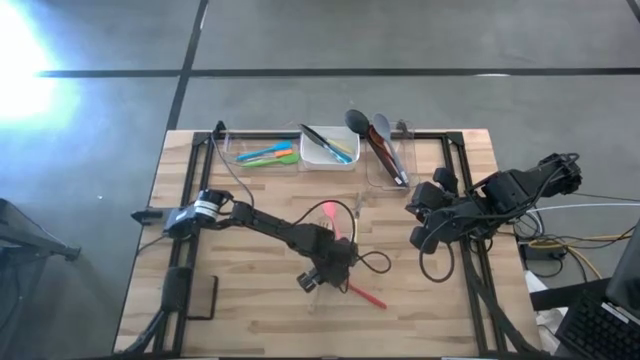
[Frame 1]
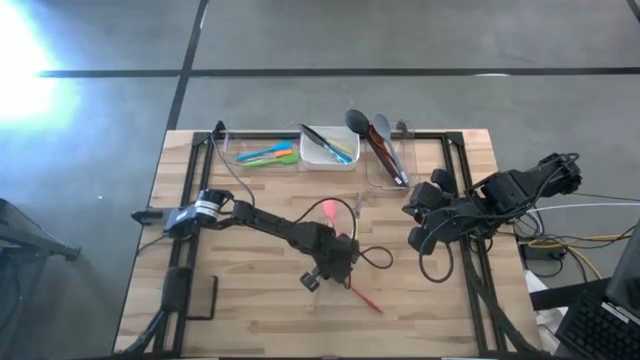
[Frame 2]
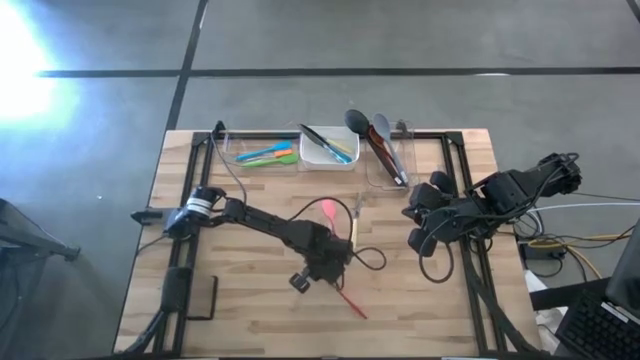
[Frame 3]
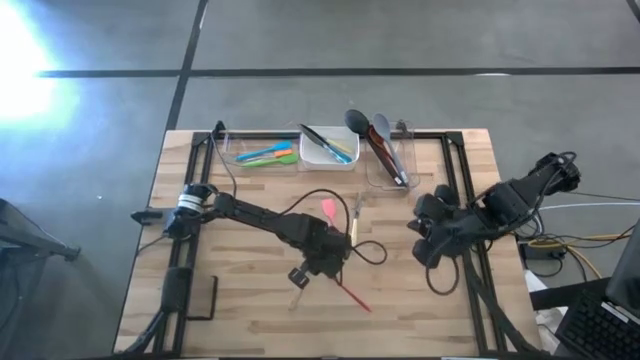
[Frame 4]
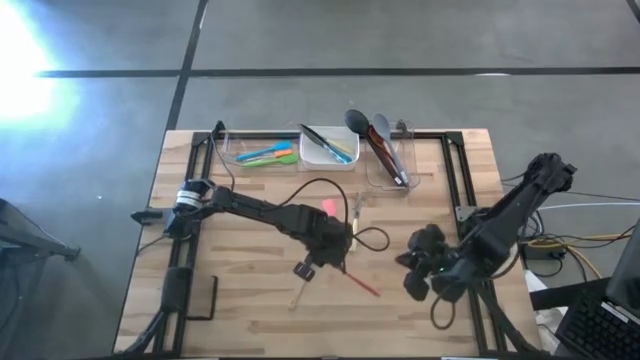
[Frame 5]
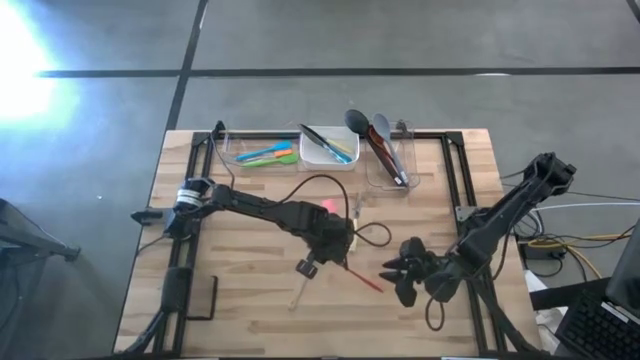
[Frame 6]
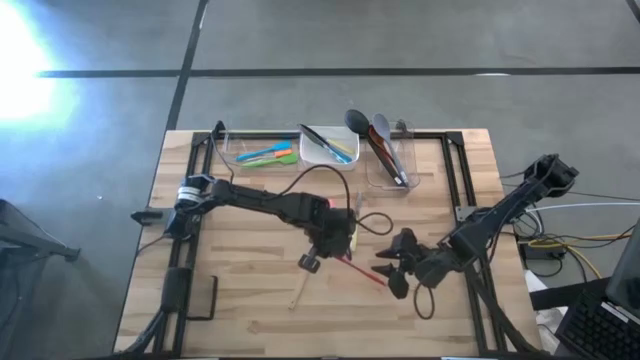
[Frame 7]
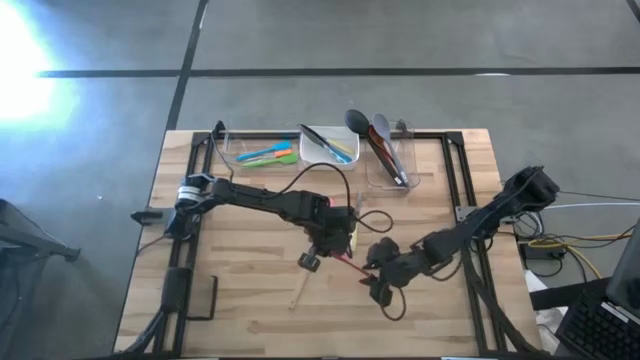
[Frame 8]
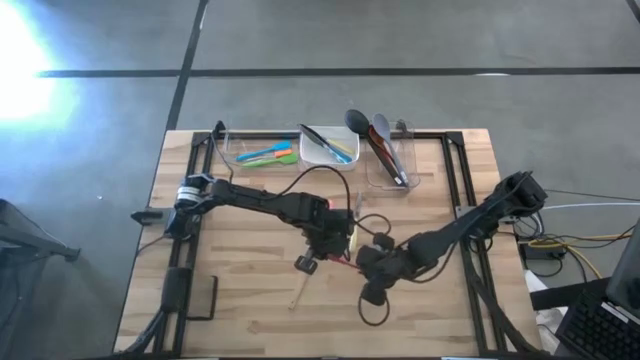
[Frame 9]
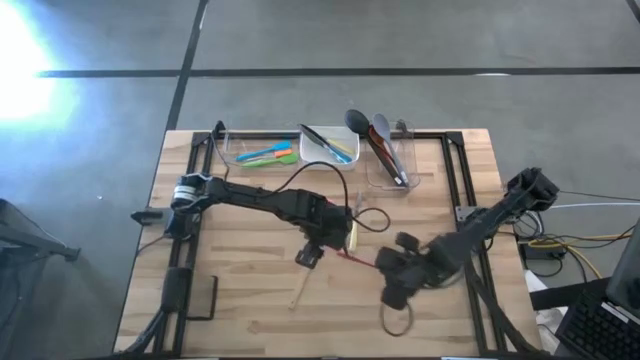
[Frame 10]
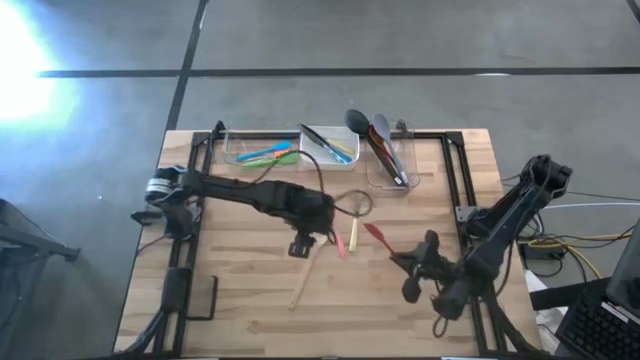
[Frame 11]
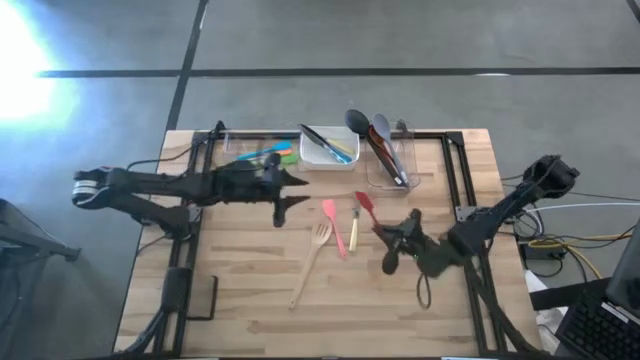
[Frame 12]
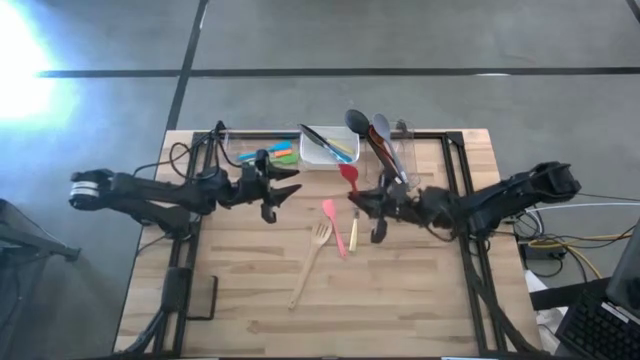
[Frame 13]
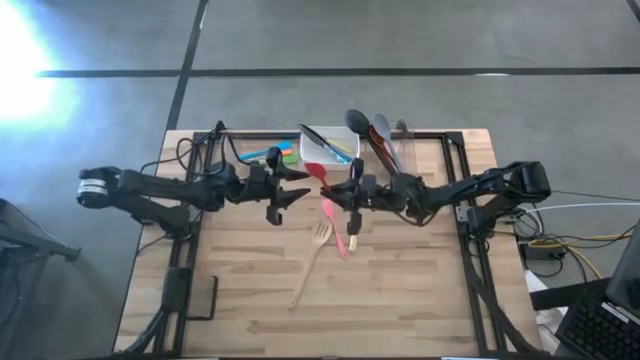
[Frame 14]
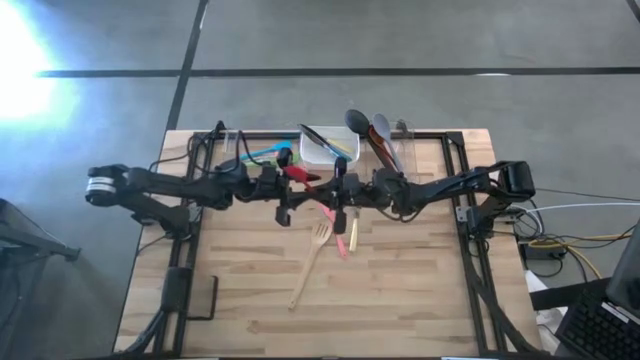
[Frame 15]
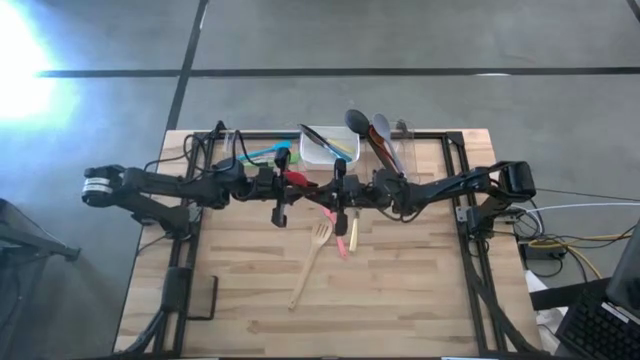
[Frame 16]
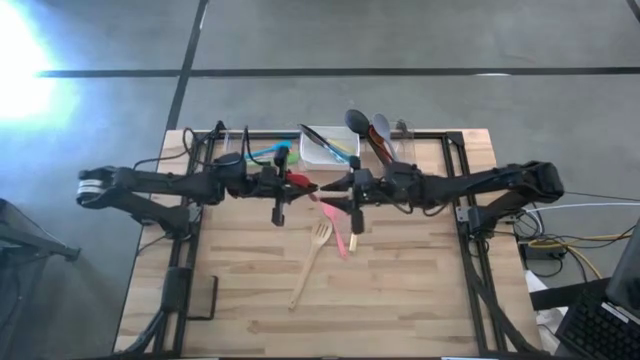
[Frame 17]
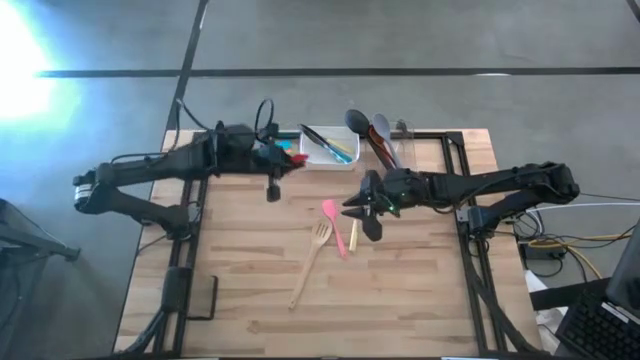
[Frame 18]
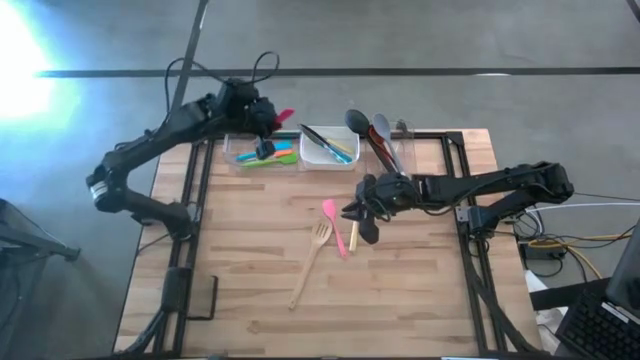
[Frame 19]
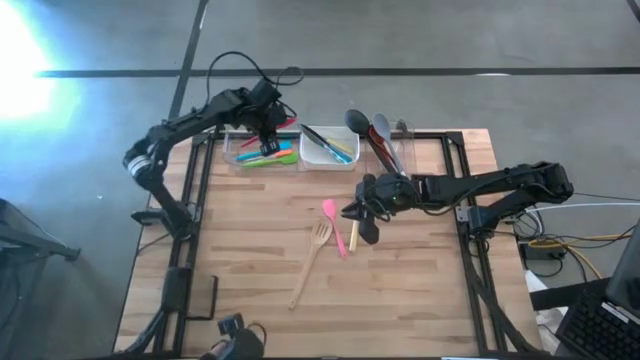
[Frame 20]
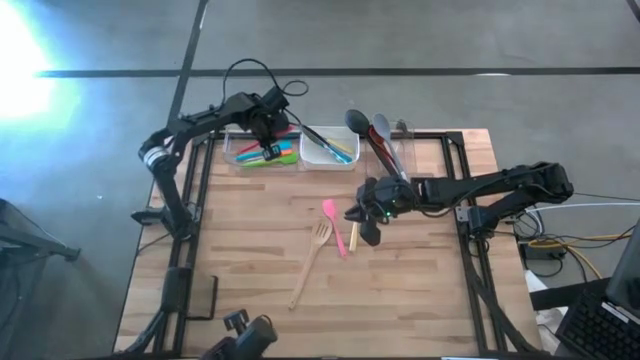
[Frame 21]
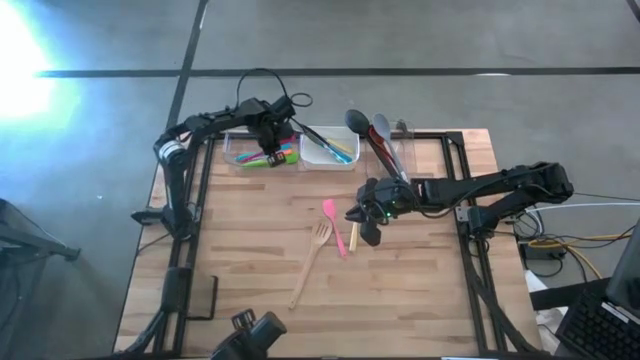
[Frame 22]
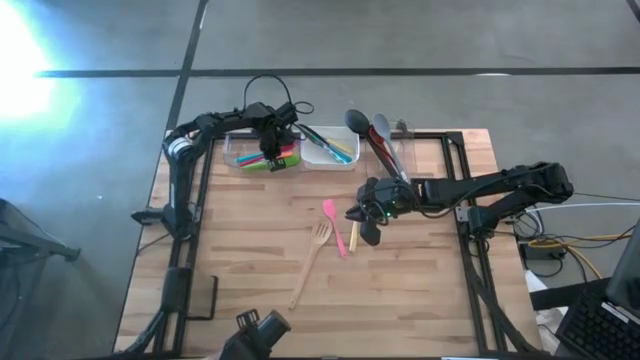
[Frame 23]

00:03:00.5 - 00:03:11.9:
Task: Pick & Place Kitchen Items
Put the red spatula into the left transparent bin

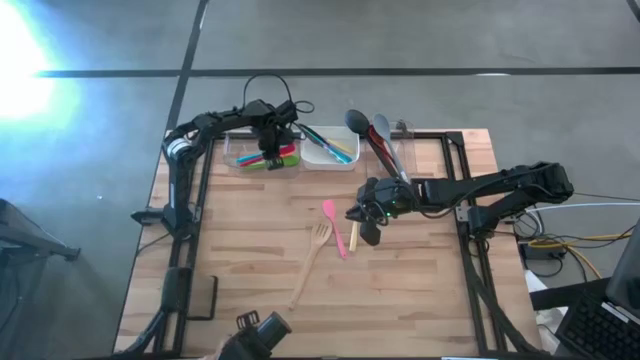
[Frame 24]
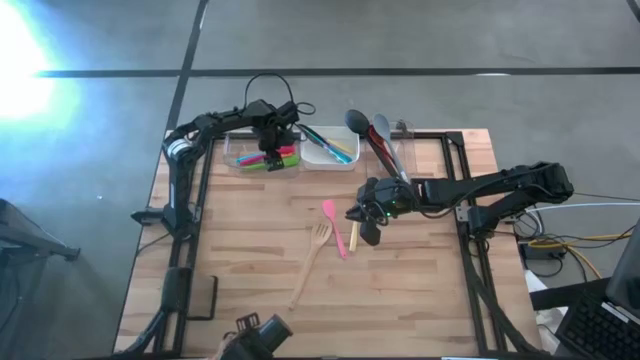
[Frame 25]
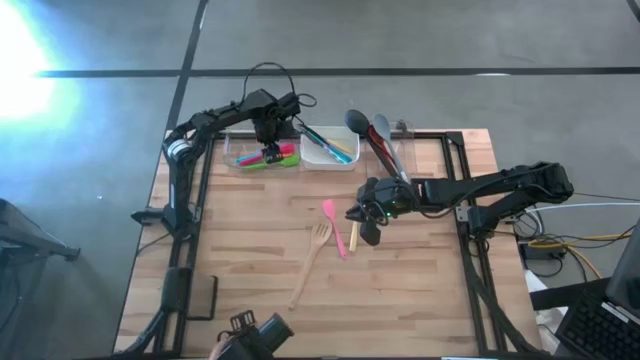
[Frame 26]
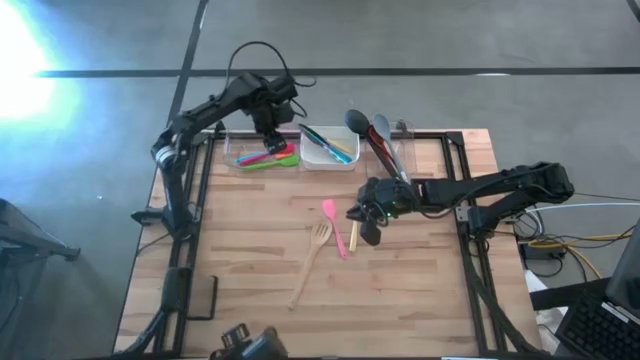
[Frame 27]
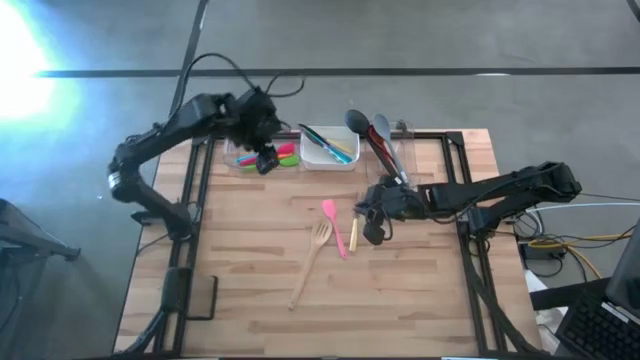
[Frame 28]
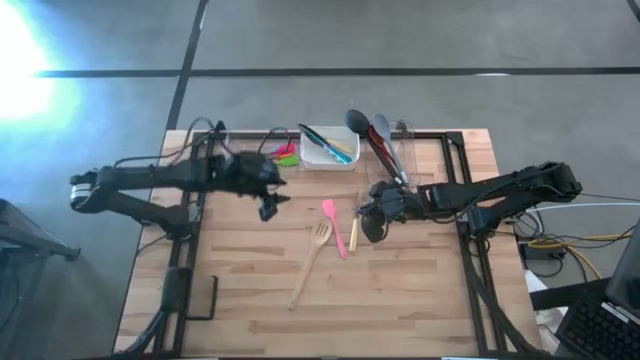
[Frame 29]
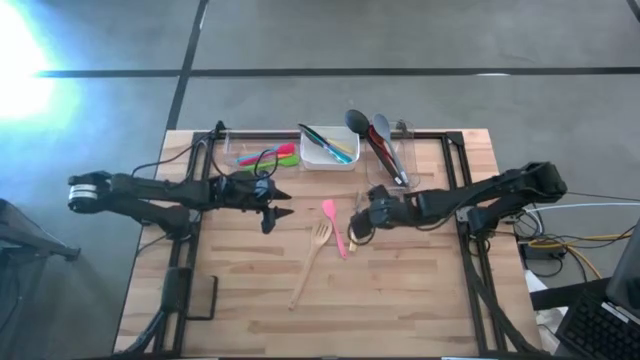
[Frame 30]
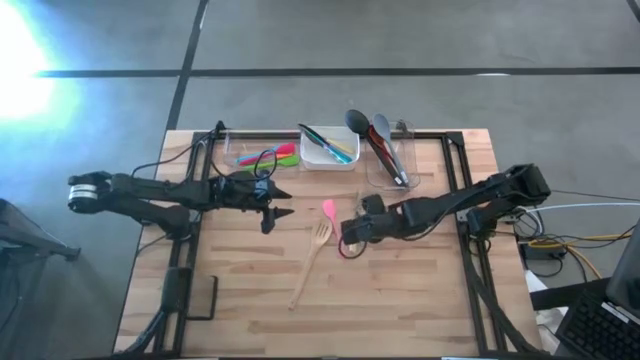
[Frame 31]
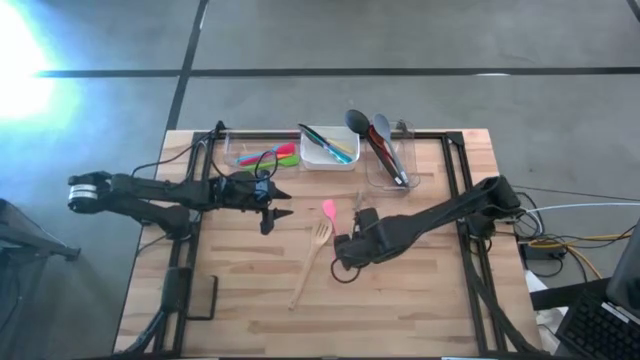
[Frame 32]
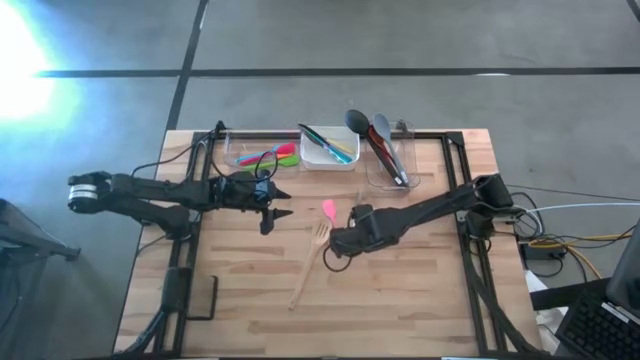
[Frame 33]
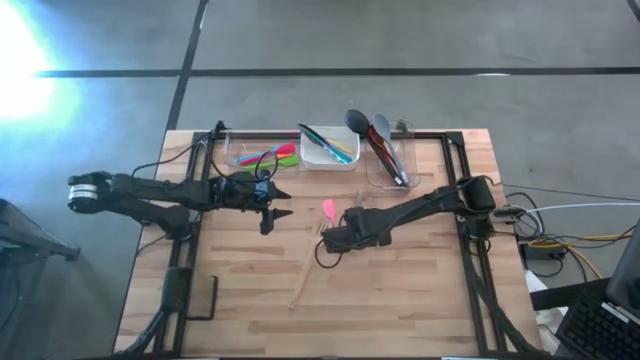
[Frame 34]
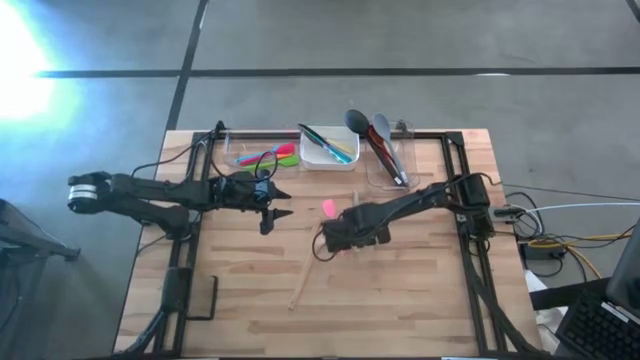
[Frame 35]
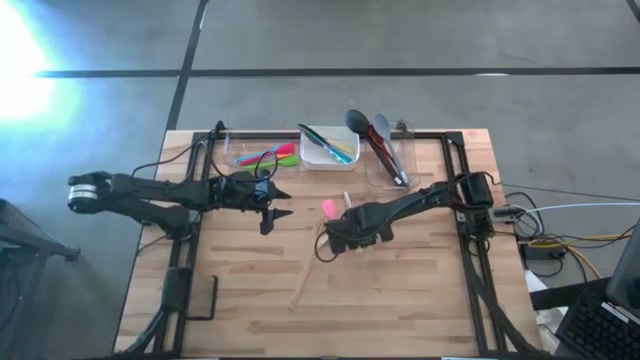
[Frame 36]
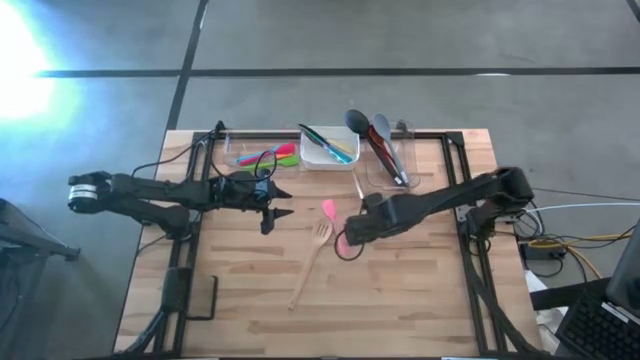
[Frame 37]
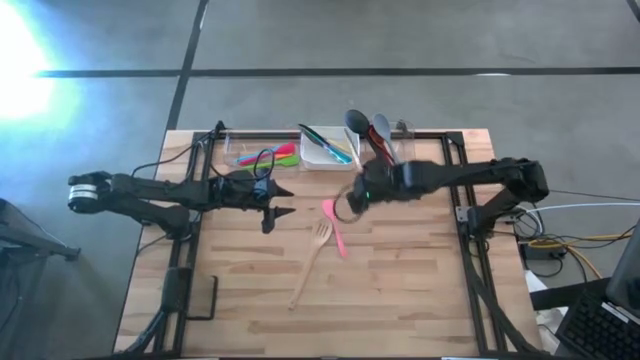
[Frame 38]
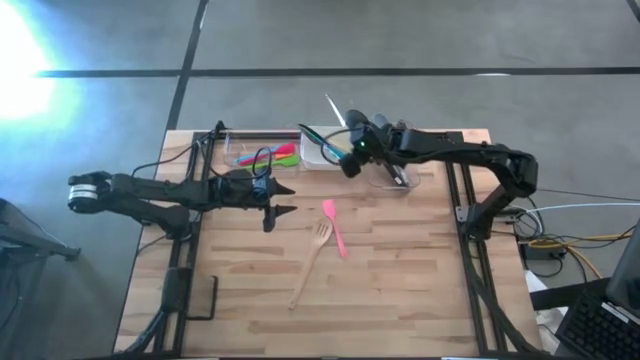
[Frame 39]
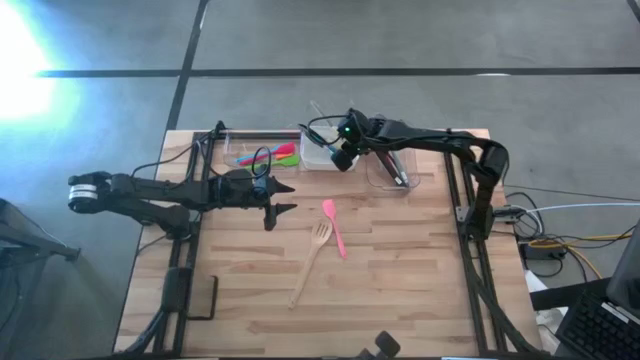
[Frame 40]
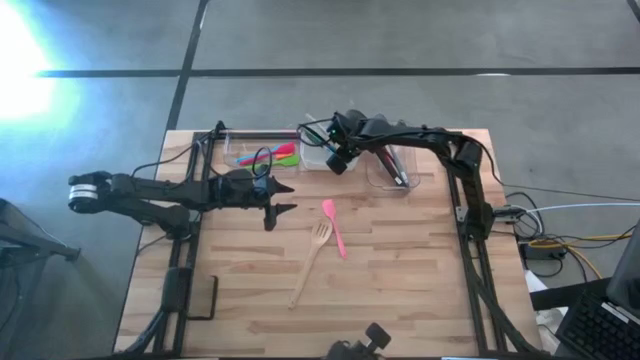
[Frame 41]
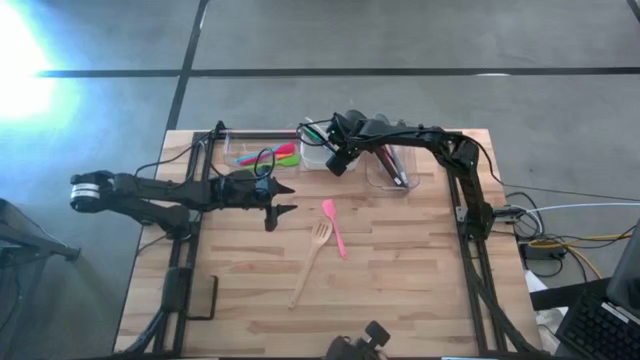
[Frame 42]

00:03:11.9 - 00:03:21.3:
Put the white knife into the white bin

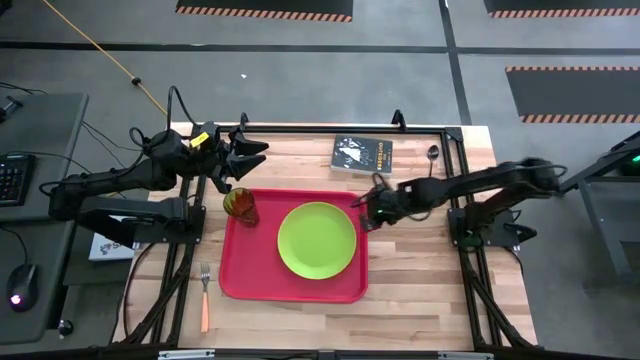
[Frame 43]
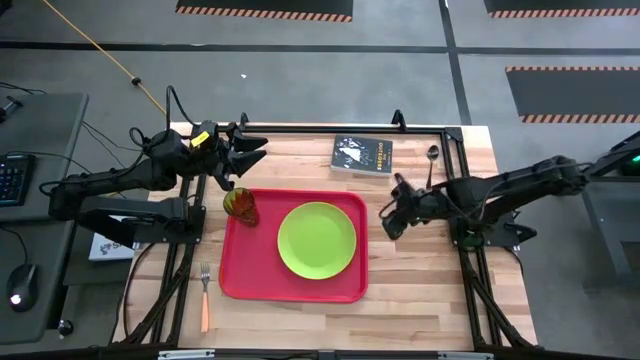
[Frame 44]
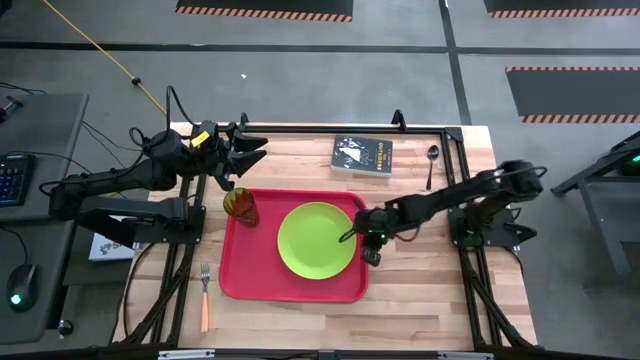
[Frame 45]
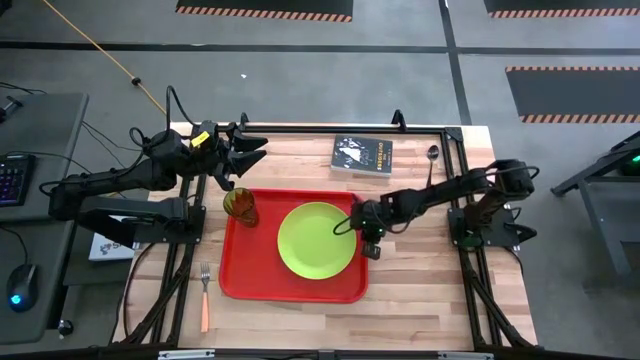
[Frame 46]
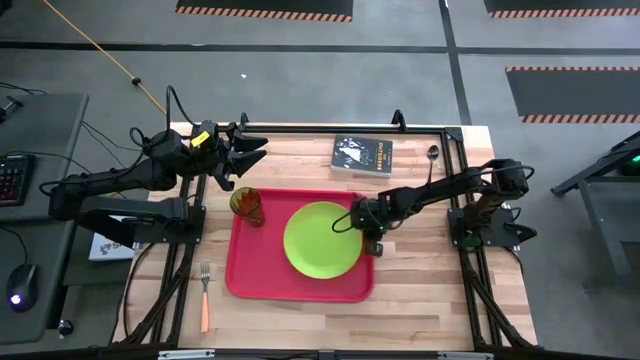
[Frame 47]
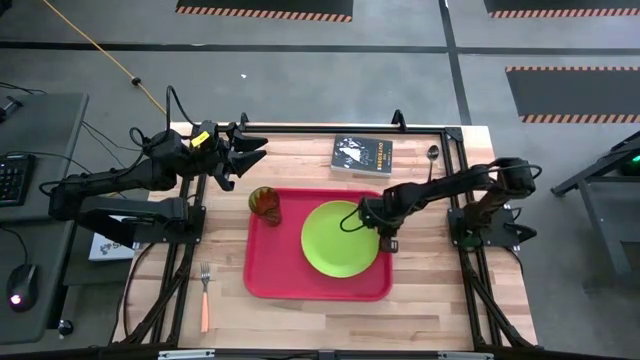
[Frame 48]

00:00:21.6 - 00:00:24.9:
Task: Pick and place plate/cup/fork/spoon on tray
Adjust the red tray
